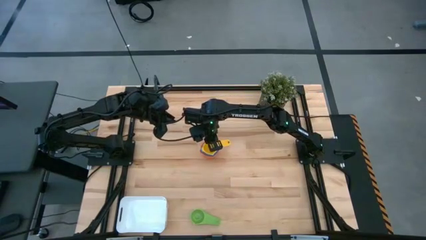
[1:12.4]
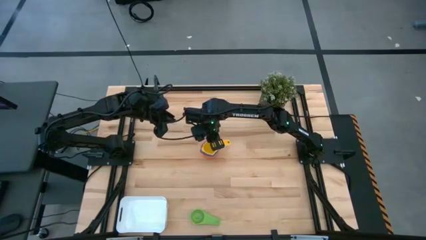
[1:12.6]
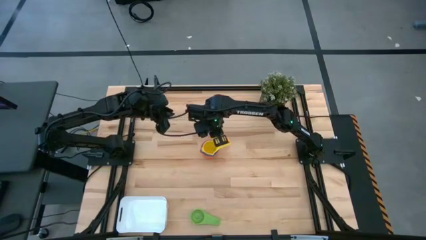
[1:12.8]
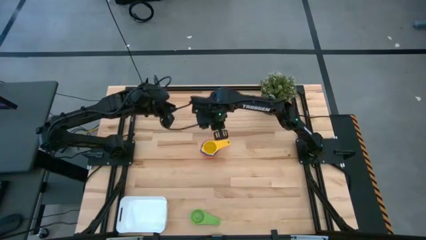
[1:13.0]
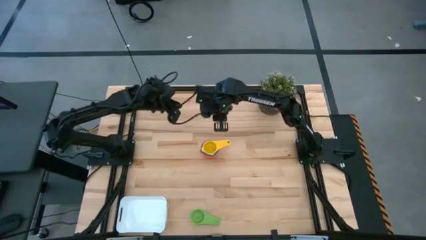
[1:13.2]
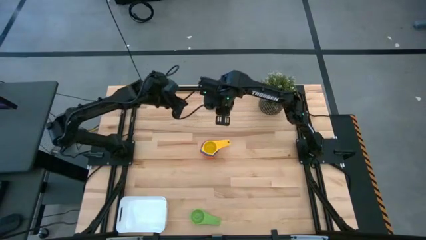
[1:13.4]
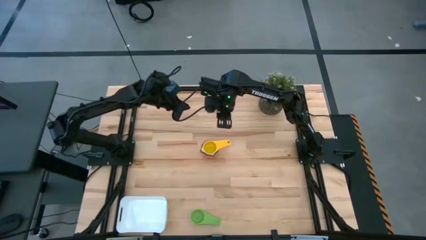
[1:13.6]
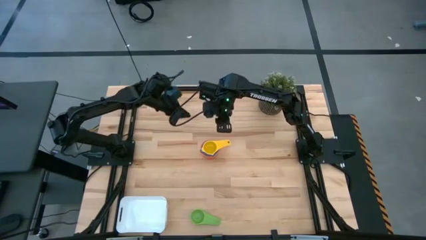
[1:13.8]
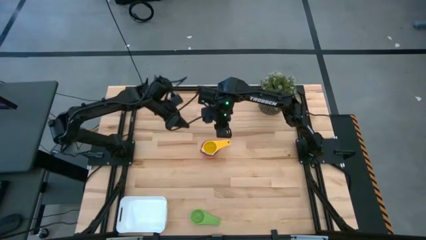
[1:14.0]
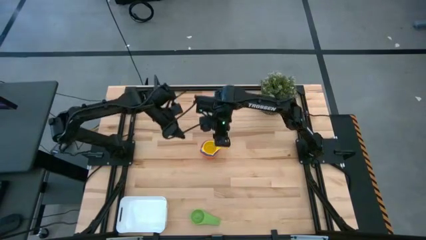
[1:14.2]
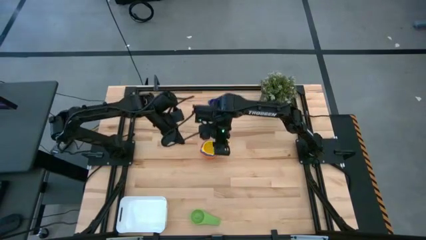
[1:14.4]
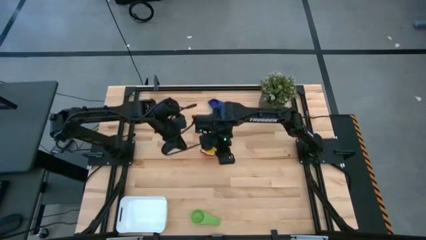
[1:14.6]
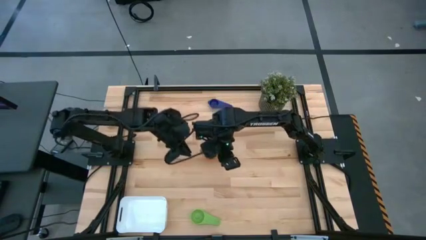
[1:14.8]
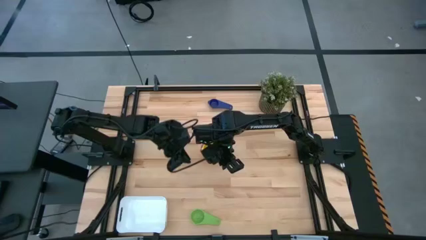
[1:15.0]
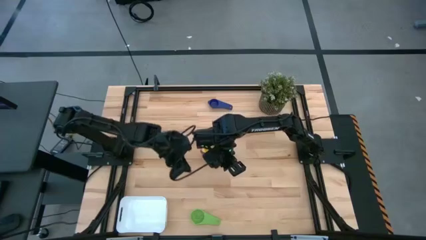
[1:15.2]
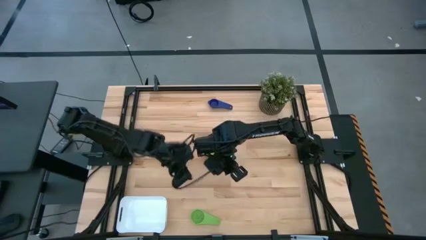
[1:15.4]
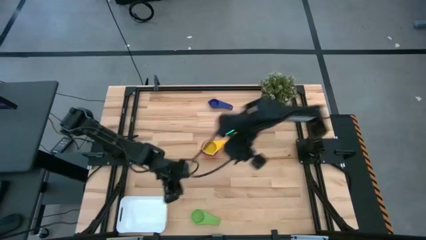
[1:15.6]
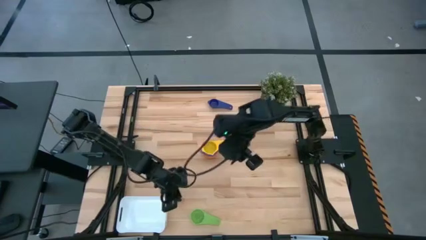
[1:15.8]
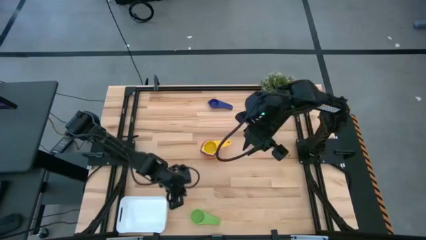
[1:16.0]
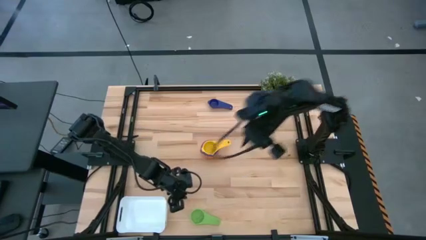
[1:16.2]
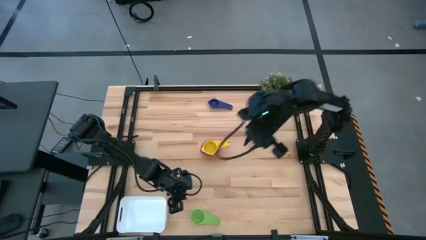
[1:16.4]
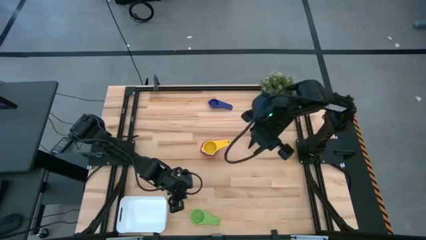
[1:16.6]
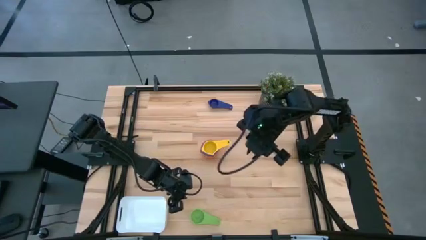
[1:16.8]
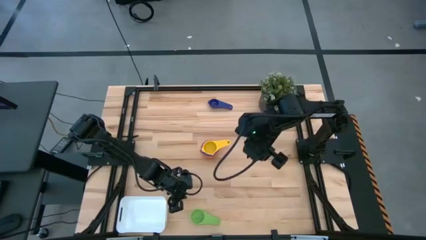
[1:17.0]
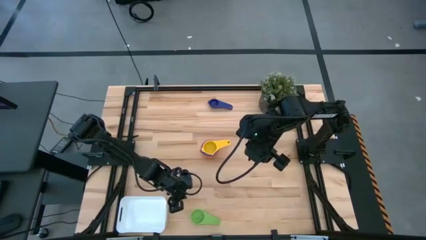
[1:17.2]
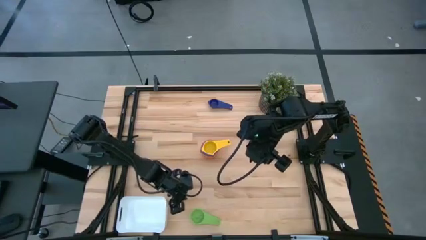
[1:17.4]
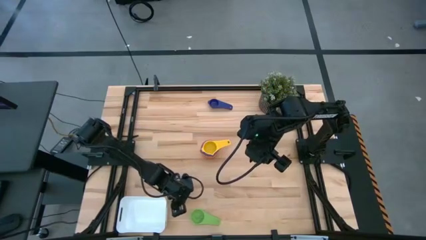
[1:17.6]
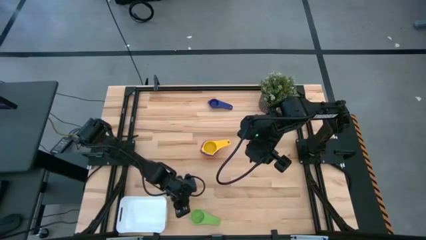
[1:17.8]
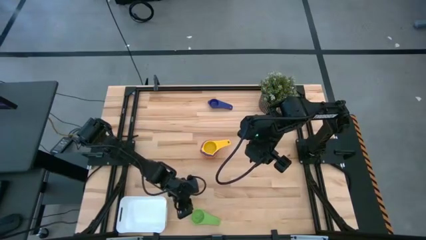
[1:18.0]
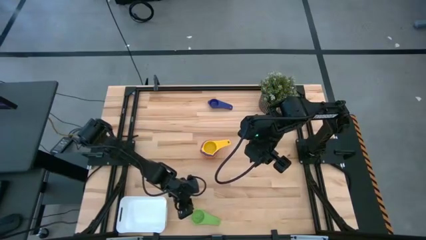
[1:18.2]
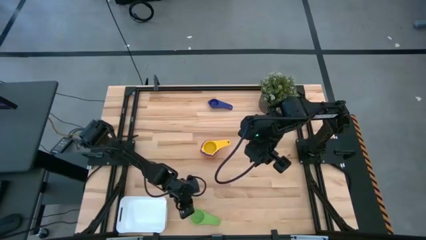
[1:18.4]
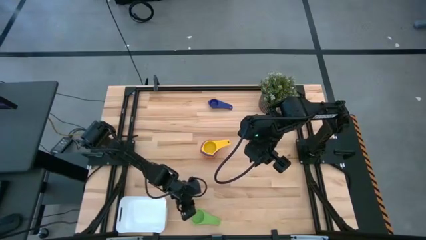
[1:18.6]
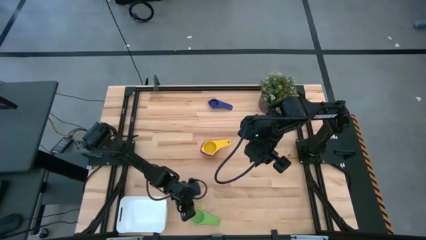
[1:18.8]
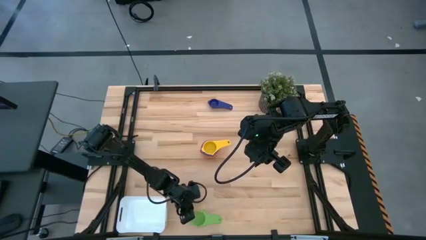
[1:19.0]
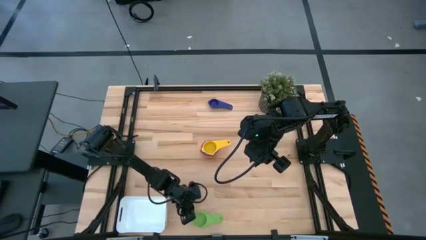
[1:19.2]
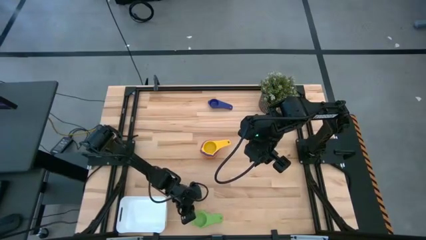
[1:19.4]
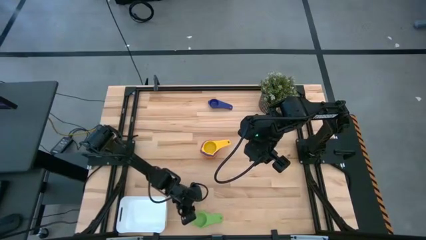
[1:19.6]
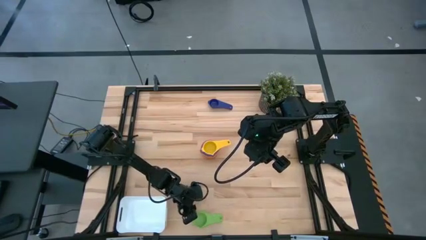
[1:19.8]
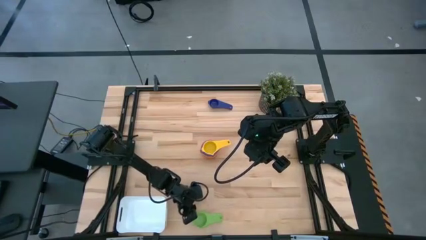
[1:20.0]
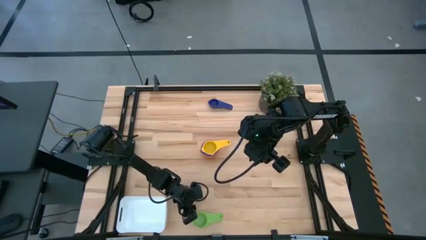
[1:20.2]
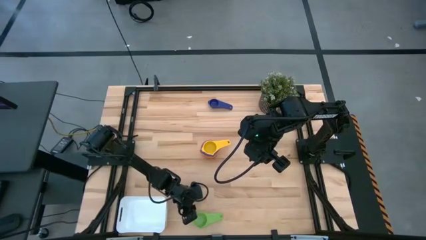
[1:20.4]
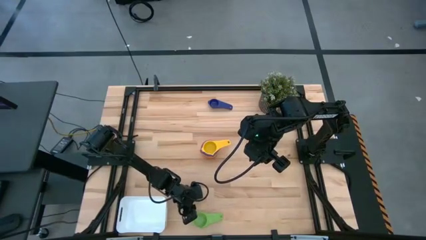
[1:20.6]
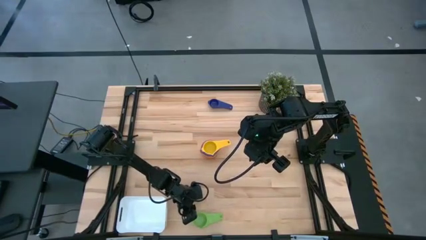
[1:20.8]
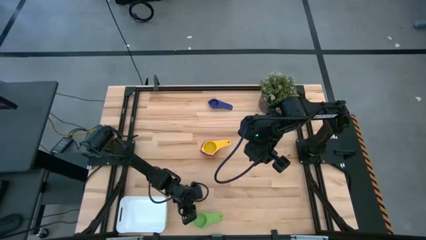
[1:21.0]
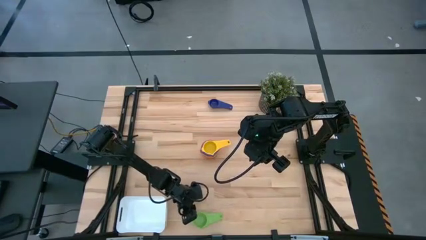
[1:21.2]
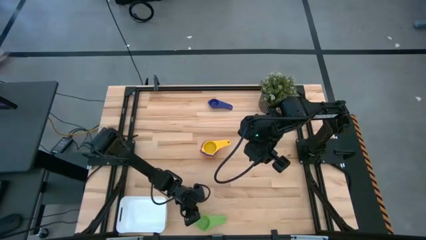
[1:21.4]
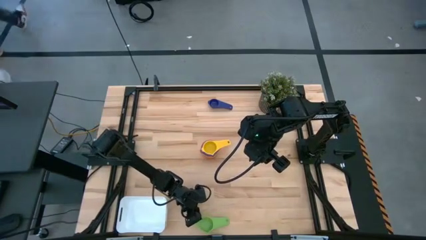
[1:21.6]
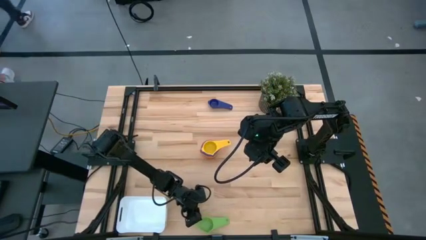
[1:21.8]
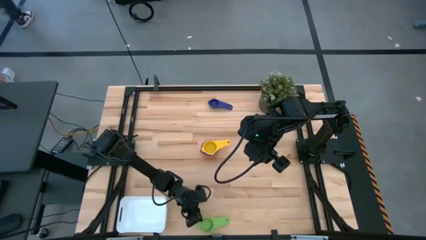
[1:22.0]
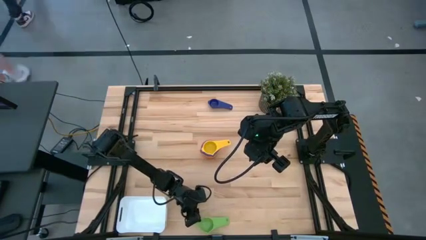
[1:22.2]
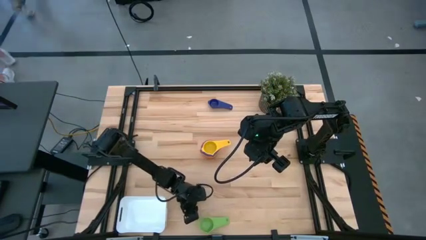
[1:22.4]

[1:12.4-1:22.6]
Task: Nest measuring cups in basket
Stack the green measuring cup into the yellow measuring cup

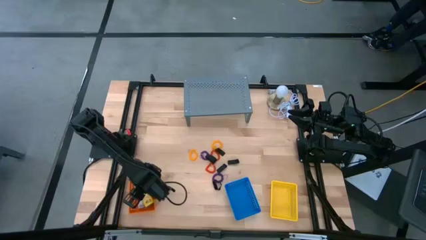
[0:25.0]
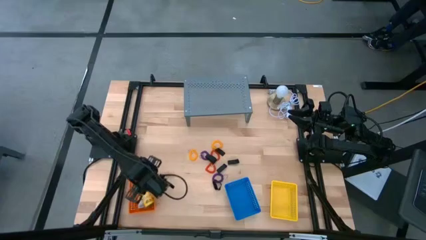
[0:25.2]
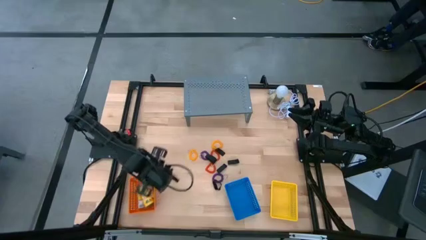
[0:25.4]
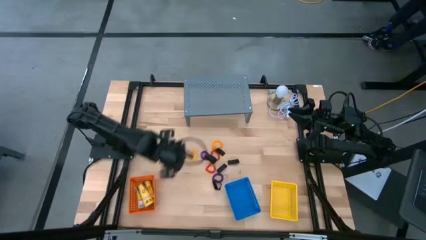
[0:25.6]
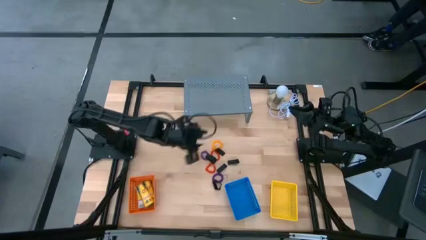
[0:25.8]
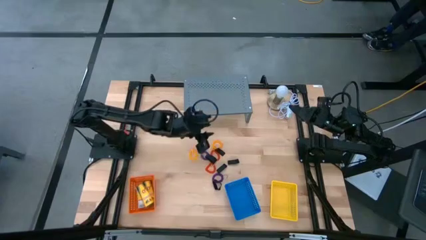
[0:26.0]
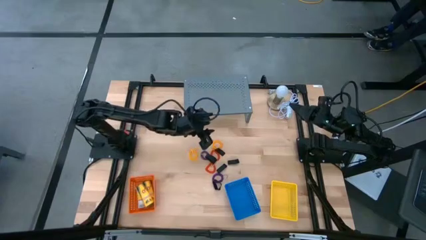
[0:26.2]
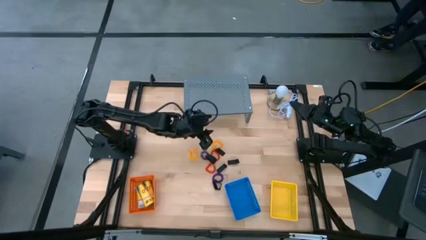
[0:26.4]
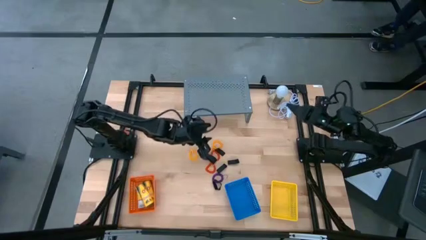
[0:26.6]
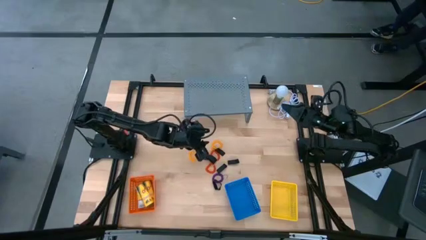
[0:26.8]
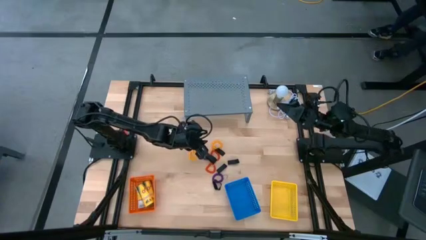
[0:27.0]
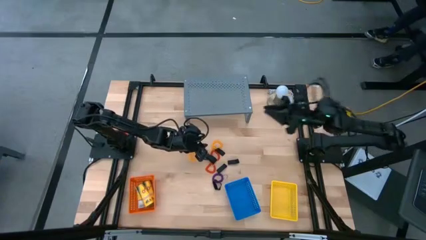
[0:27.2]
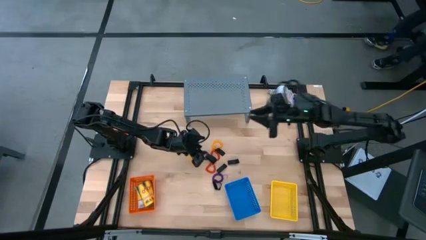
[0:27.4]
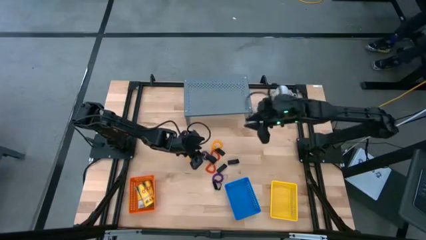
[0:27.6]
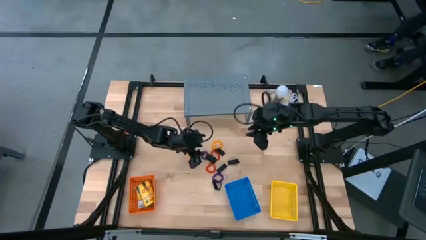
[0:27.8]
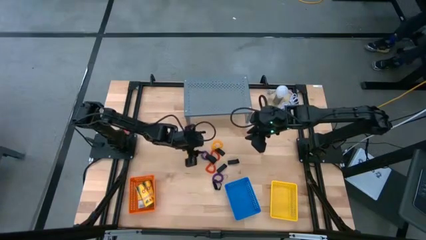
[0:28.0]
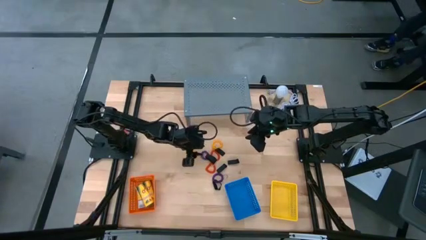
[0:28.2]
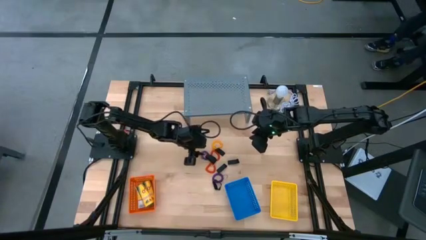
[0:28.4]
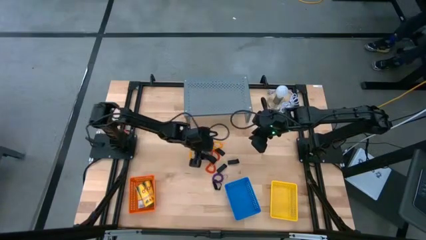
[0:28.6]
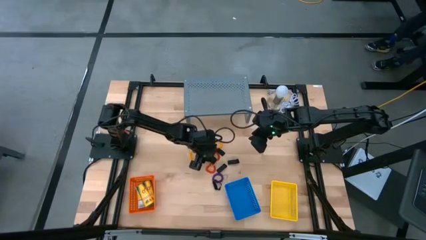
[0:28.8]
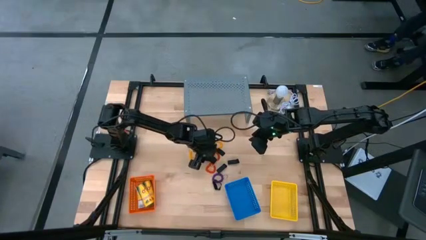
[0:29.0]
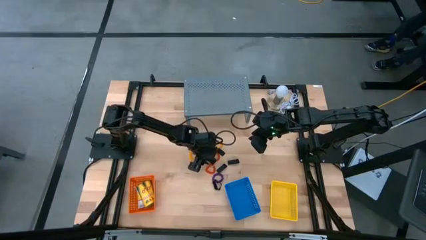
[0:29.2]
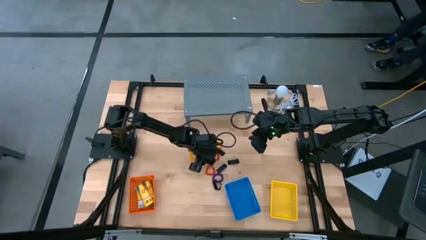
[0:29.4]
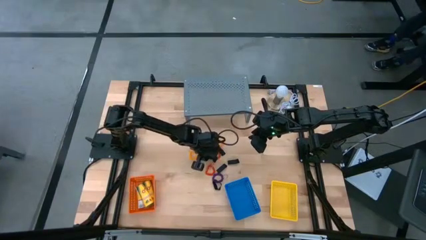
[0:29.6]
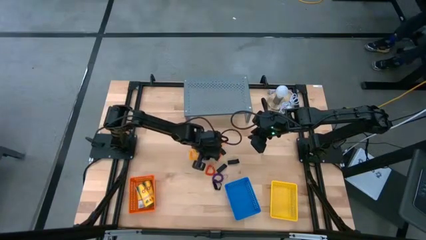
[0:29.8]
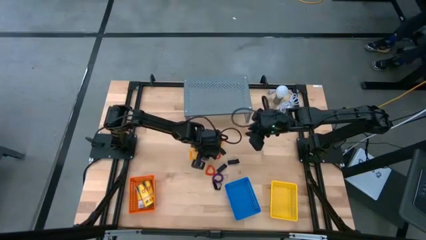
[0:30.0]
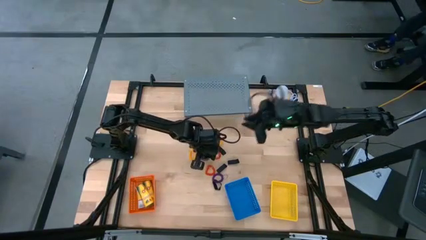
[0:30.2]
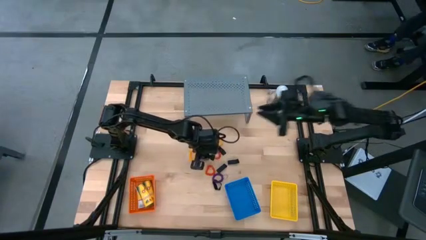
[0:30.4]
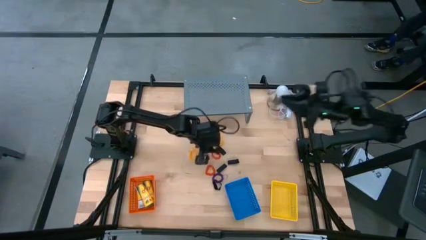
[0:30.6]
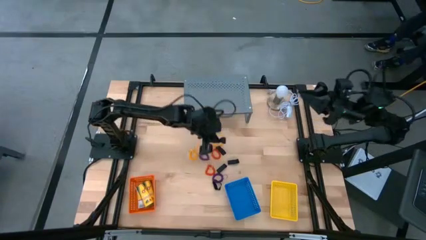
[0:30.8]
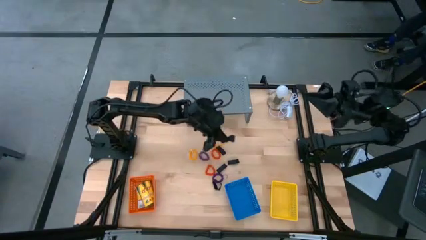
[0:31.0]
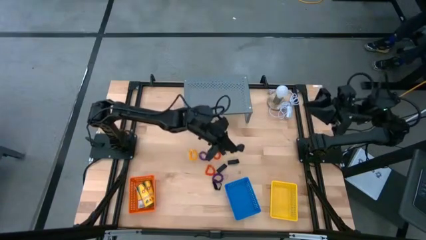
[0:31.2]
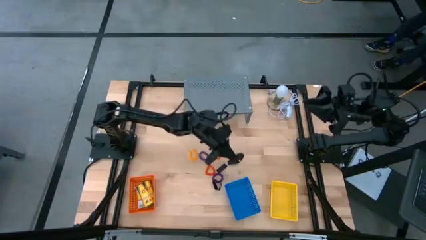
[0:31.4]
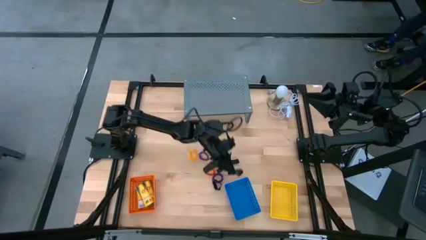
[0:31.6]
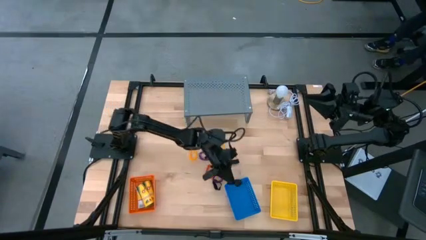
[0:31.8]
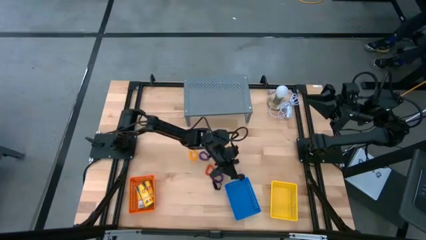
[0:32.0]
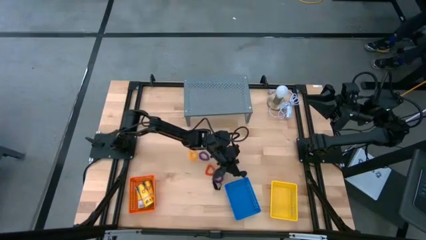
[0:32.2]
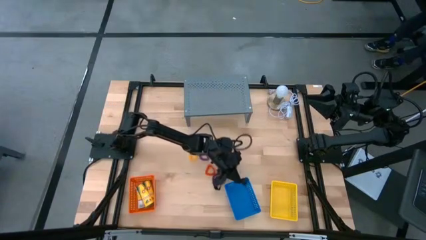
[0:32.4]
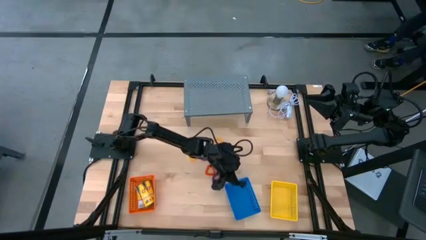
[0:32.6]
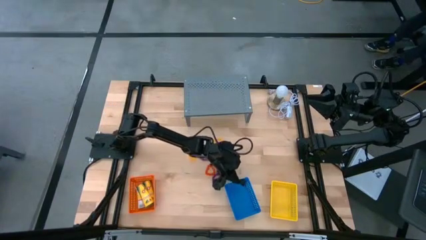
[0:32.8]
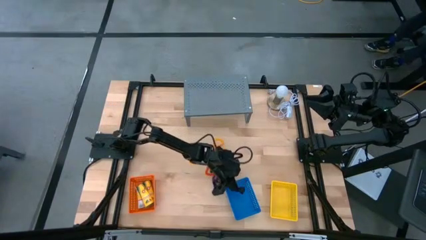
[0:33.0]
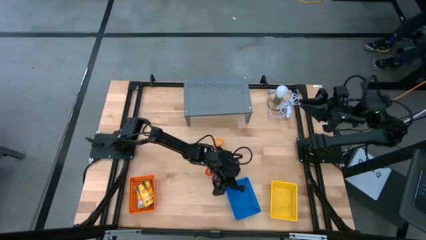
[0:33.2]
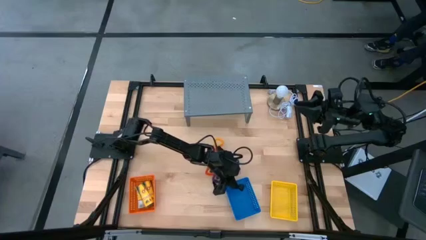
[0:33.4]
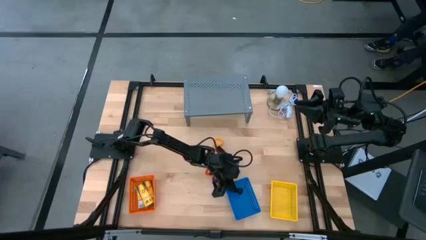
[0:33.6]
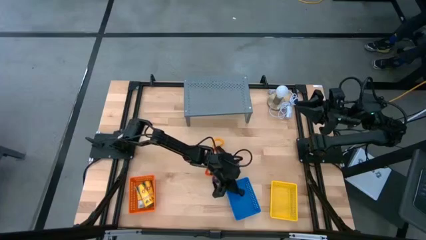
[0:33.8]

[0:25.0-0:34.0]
Task: Pick & Place Office Desk Supplies
Put the black rubber band into the blue bin
